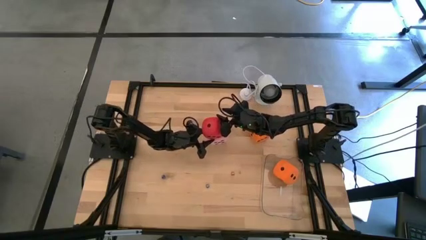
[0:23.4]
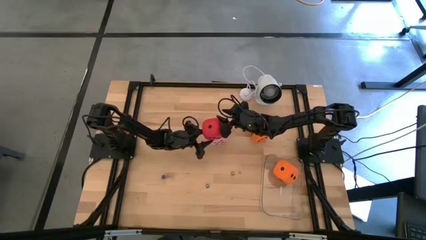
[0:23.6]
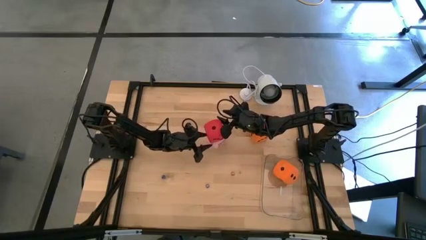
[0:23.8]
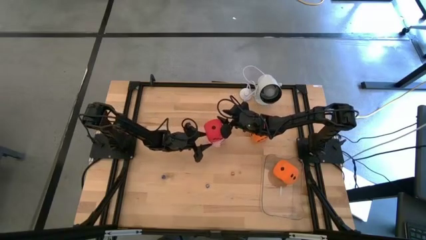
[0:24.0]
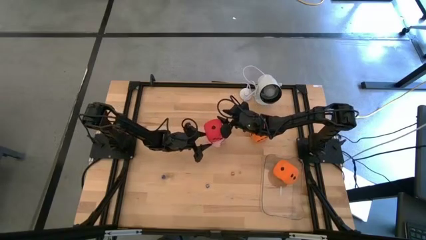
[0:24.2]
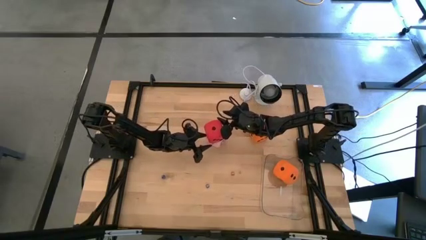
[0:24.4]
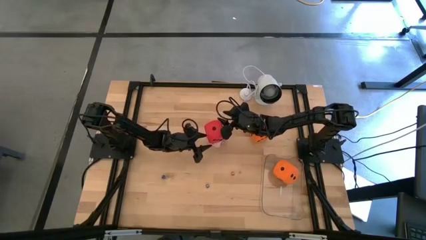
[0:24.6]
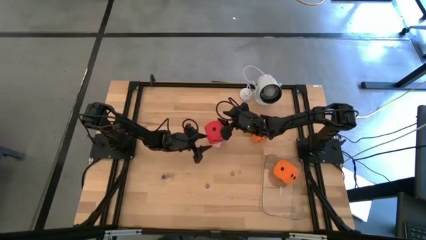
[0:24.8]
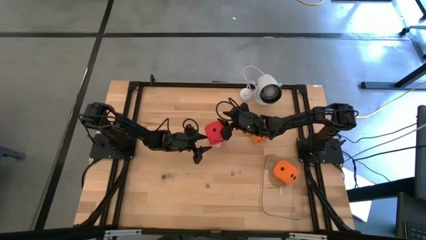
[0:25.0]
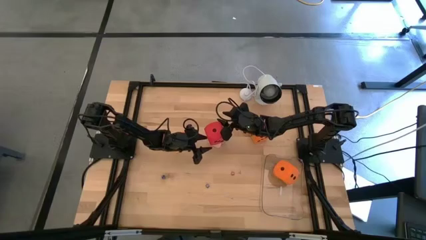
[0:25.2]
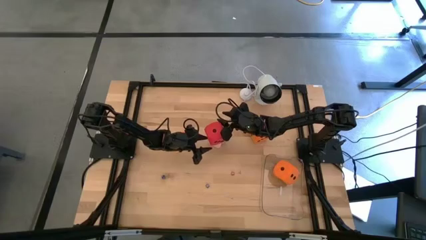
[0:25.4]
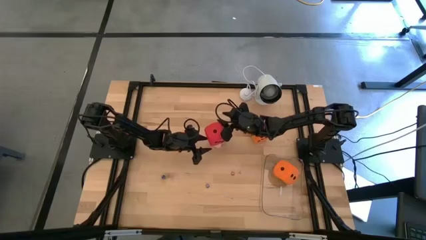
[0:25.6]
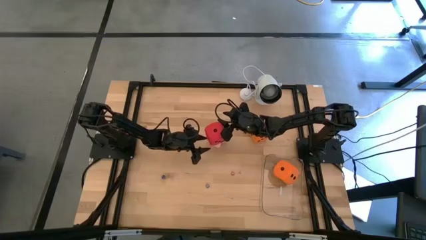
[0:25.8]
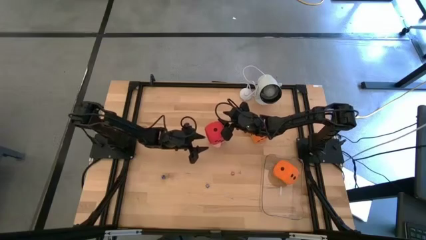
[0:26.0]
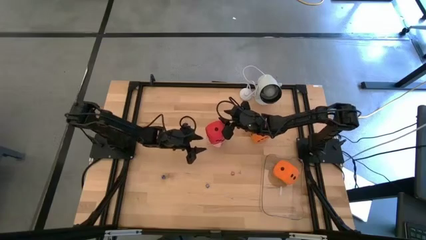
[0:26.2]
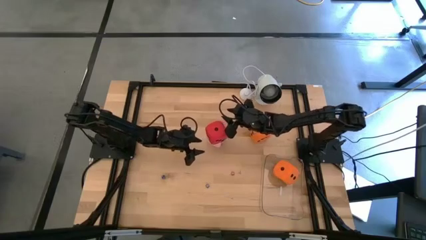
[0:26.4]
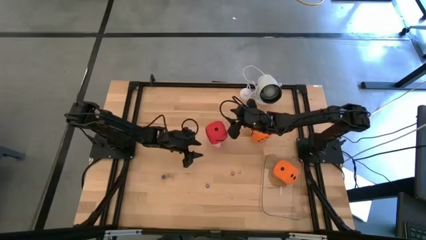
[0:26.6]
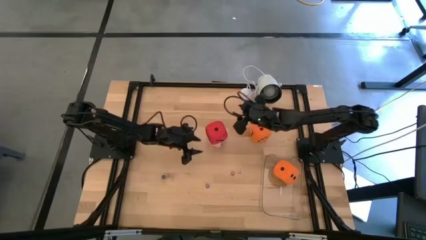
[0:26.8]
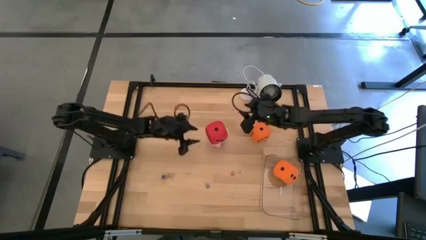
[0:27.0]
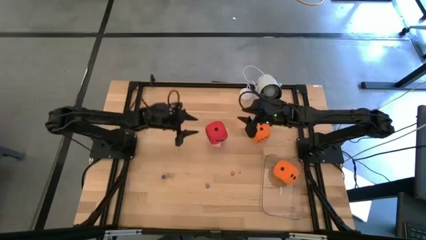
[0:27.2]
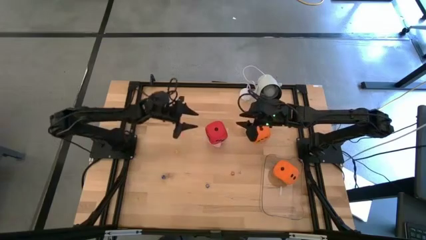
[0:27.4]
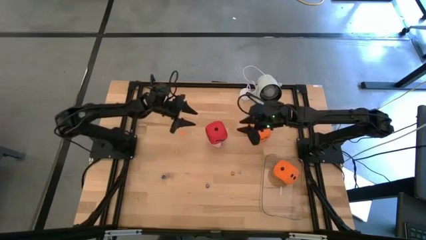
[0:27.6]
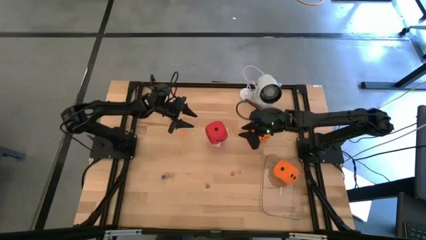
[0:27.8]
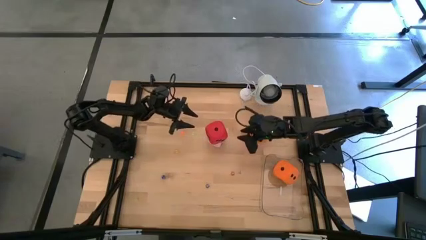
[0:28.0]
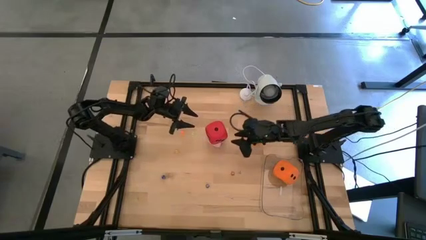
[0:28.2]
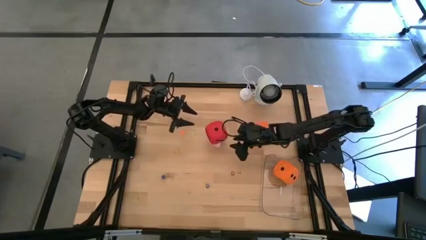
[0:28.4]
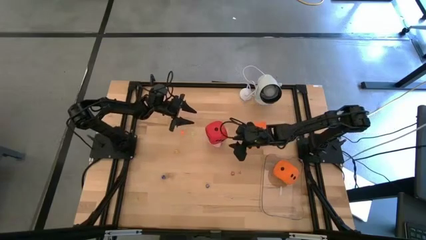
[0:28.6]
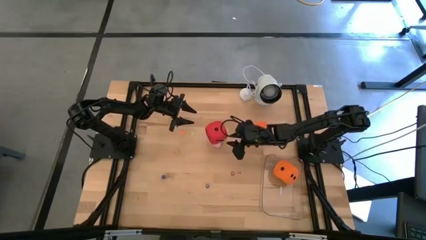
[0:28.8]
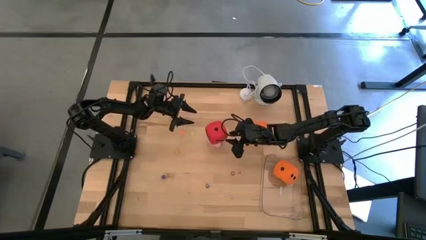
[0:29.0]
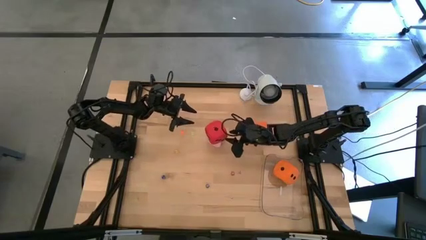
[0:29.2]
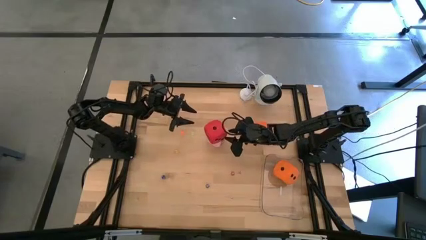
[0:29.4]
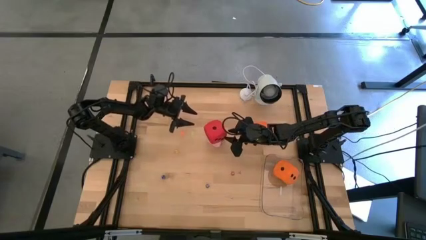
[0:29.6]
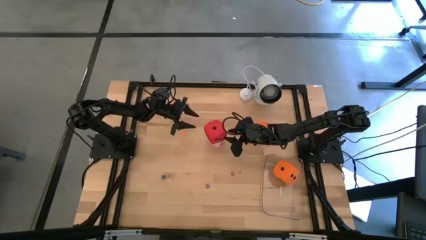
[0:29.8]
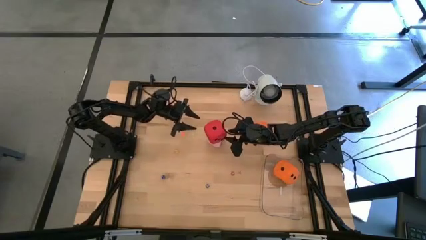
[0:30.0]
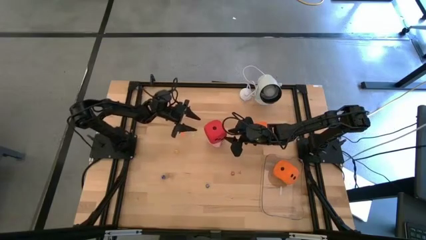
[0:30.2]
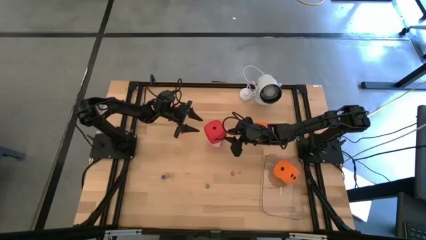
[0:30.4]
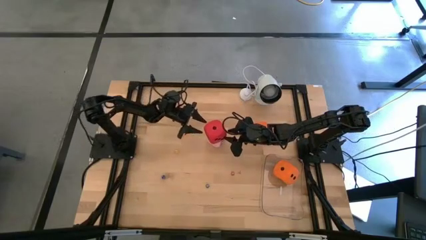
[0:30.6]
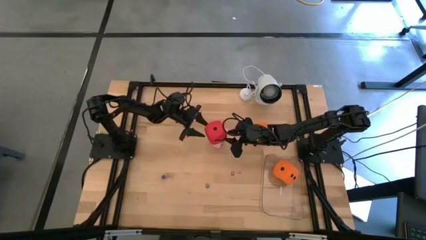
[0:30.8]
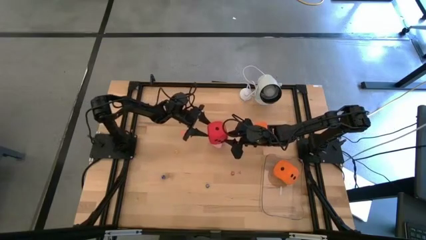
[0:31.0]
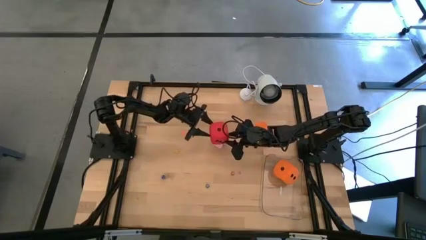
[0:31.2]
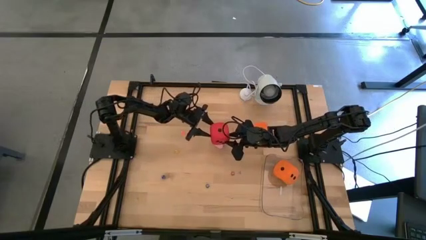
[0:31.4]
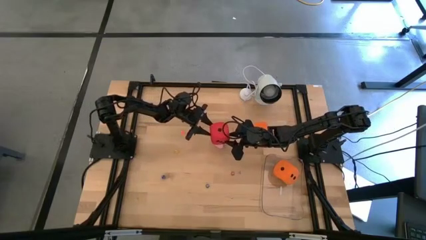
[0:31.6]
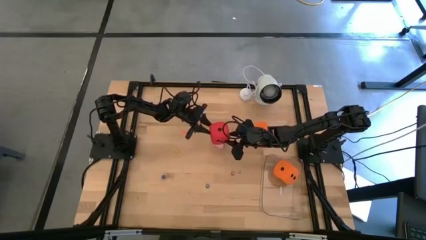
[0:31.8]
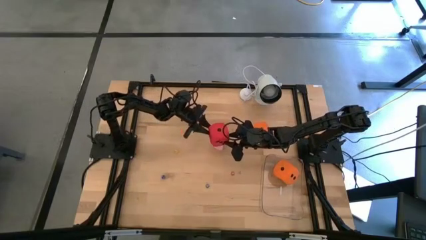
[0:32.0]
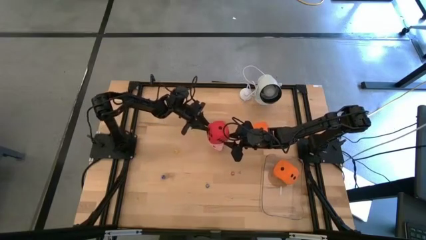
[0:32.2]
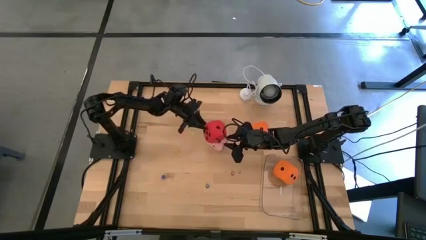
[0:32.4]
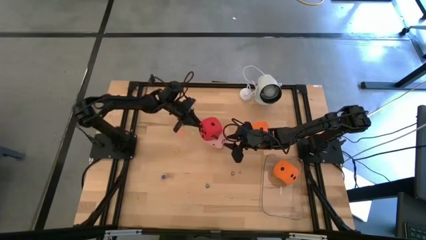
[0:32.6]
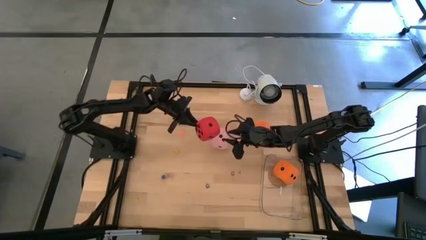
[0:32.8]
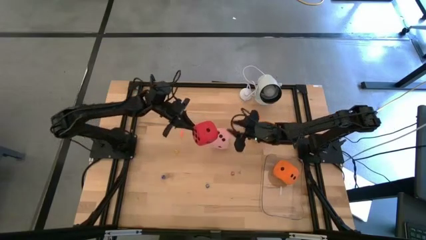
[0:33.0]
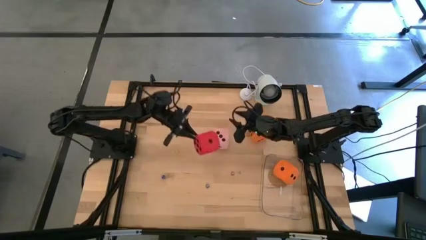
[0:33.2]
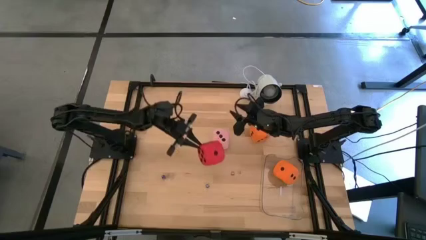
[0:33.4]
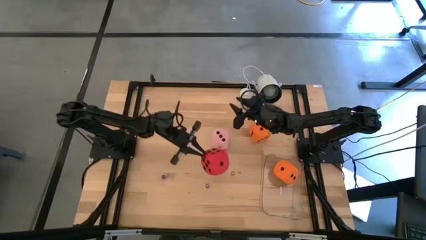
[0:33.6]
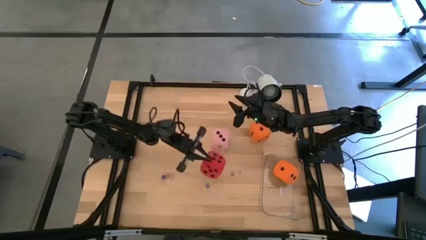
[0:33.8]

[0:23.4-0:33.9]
Task: Pick & Place Dice
Put the large red die into the transparent container

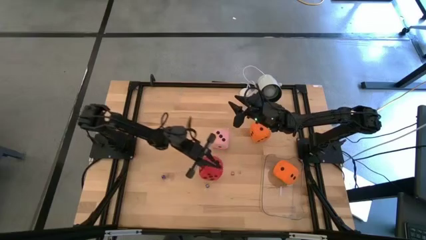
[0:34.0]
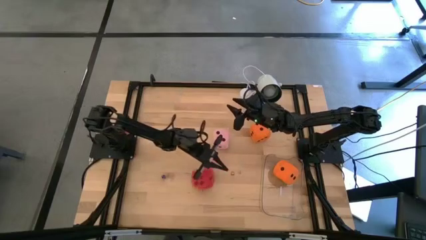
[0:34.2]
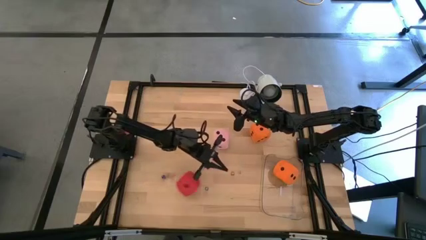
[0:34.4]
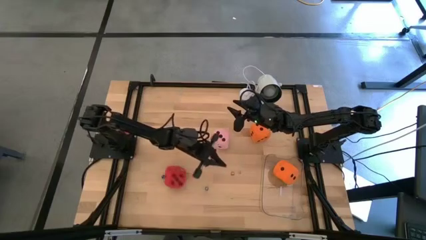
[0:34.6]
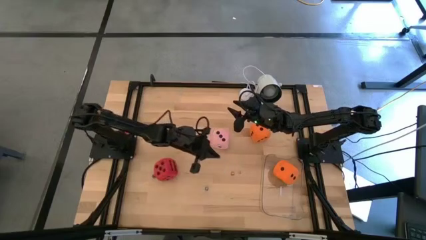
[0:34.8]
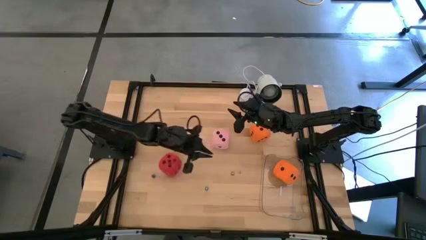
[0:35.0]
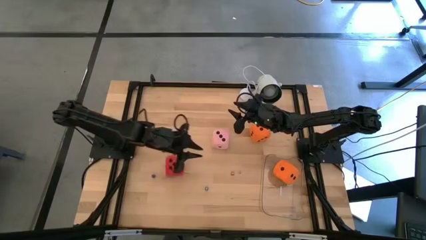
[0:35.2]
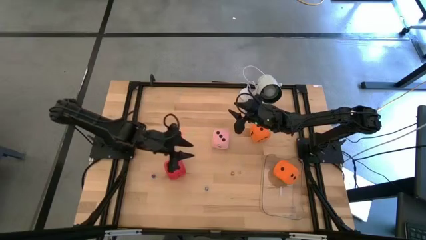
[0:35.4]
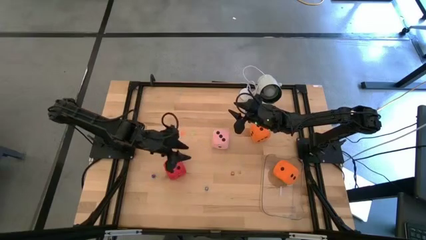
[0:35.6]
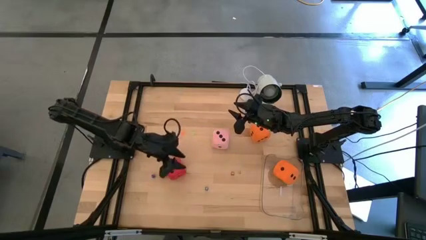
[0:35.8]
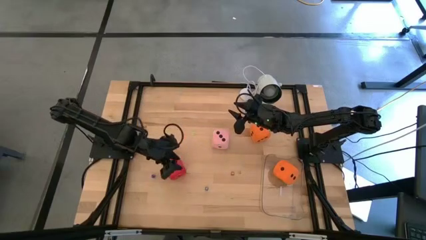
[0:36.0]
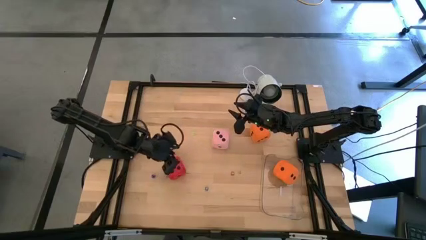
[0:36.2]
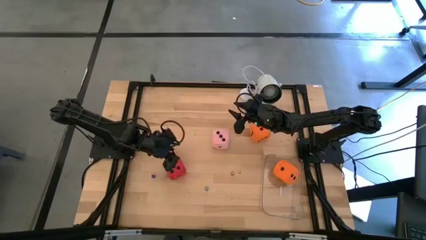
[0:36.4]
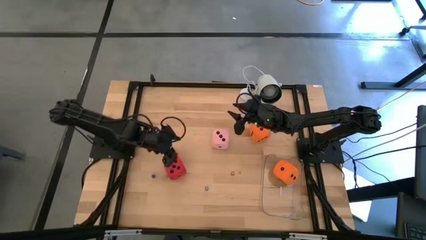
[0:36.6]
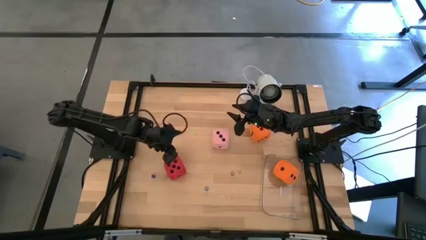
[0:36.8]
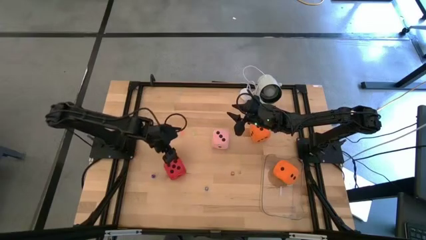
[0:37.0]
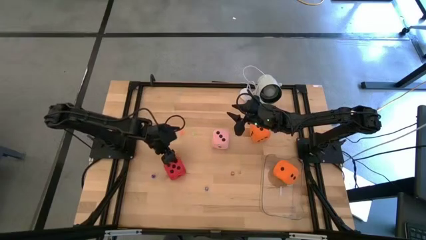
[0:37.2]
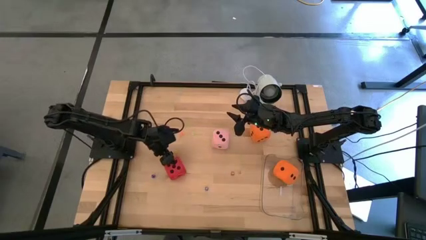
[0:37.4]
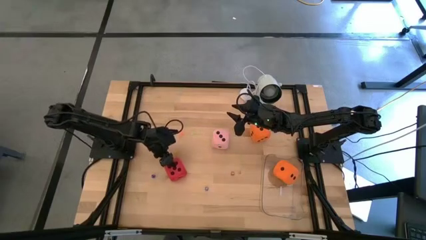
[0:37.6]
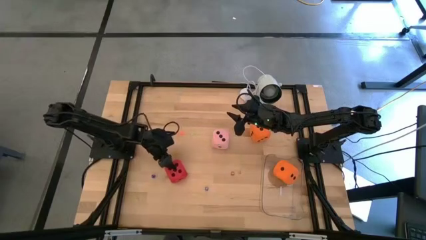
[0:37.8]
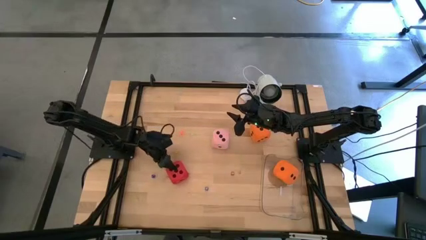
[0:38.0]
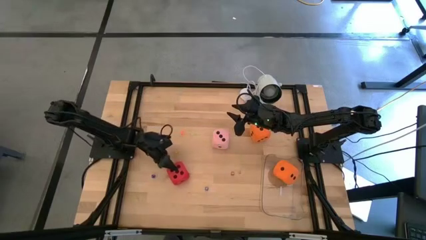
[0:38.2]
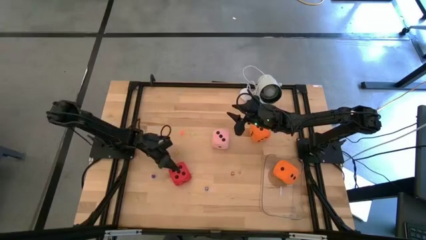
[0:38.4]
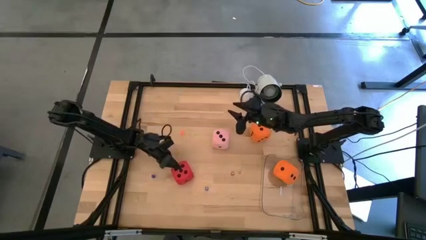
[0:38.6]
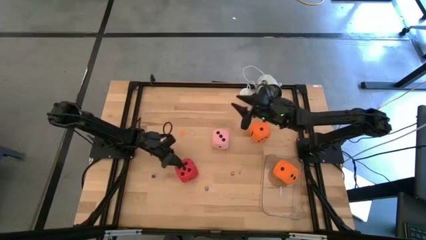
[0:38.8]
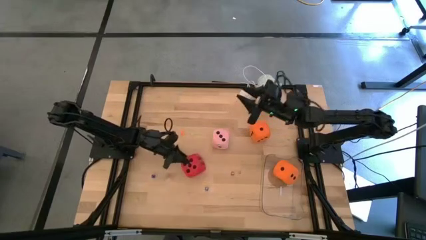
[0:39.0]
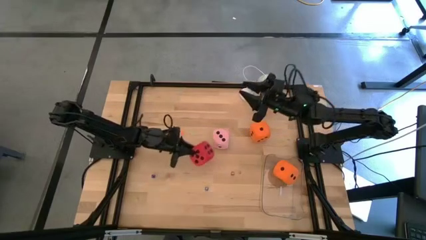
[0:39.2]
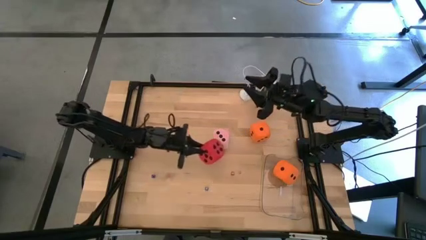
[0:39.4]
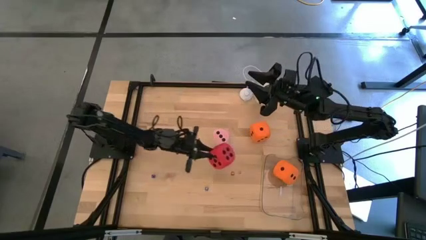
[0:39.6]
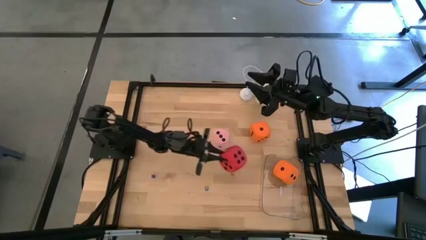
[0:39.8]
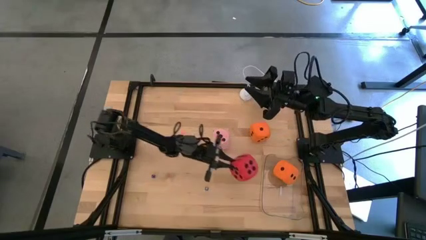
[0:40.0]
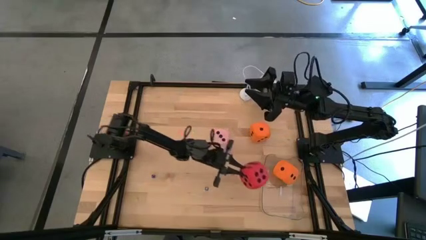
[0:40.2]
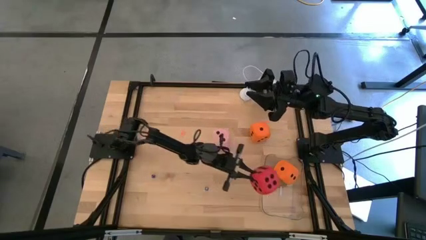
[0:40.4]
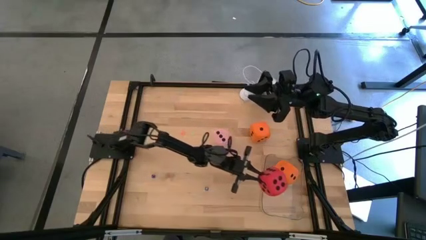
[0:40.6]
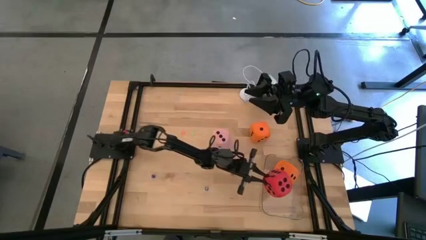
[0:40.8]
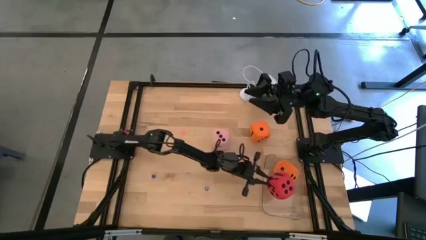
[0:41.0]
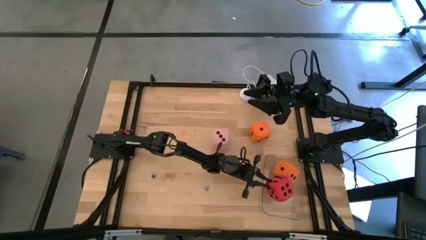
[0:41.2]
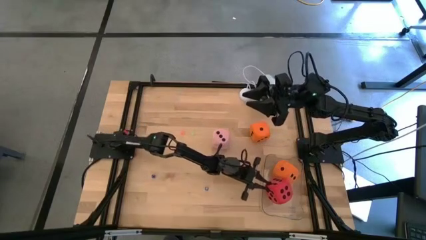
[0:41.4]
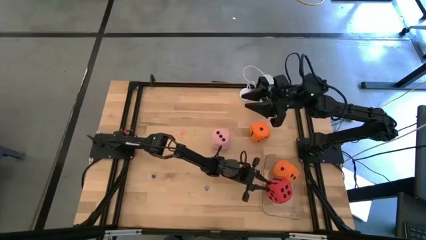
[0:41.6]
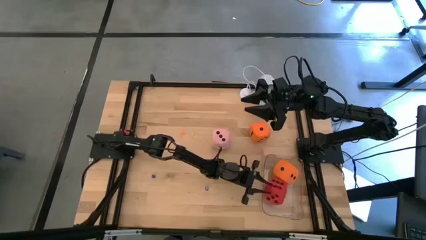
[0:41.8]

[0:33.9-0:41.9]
Put the large red die into the transparent container
